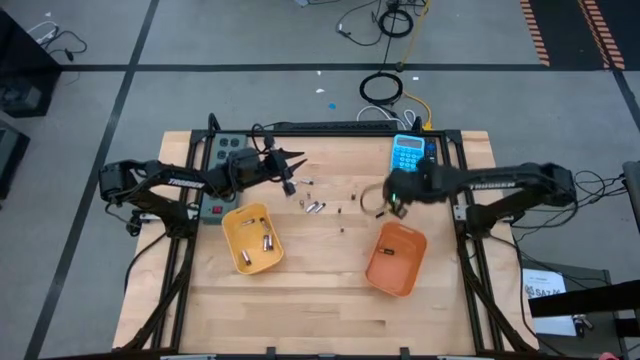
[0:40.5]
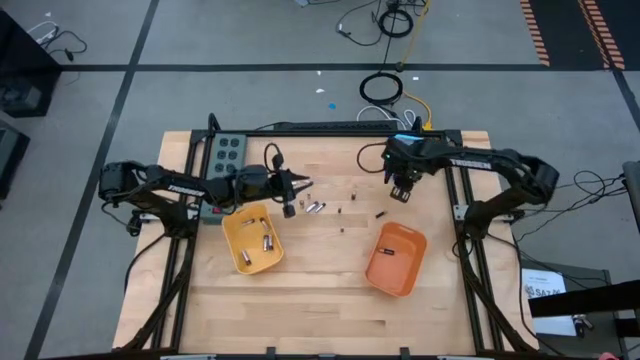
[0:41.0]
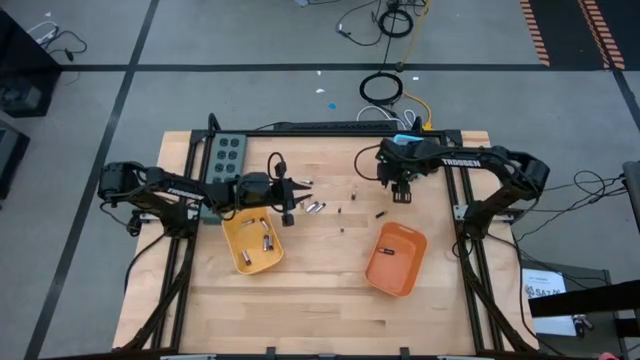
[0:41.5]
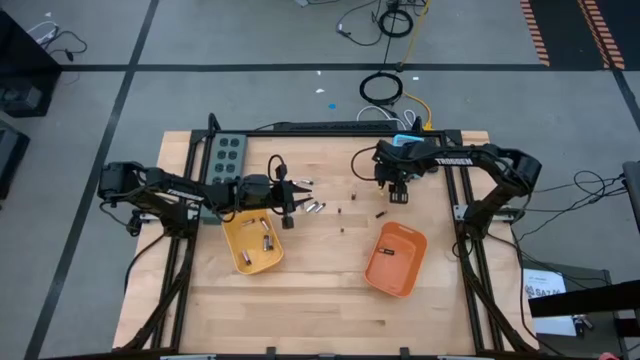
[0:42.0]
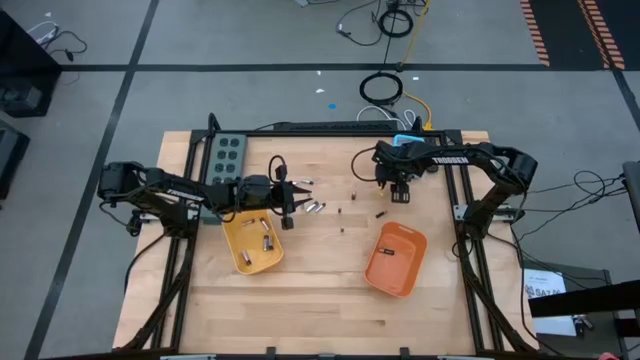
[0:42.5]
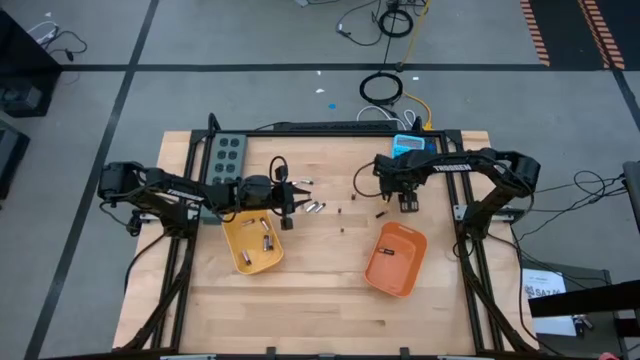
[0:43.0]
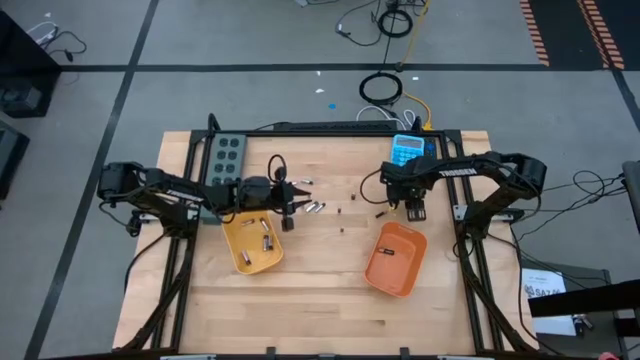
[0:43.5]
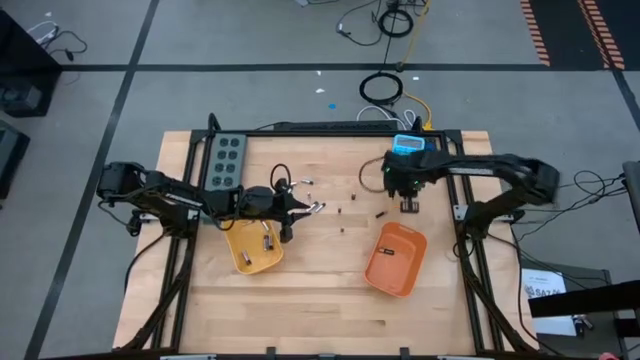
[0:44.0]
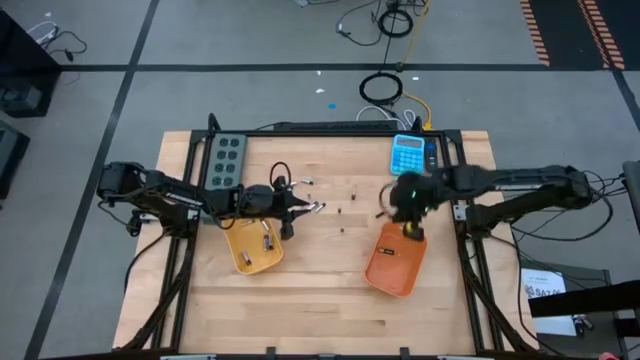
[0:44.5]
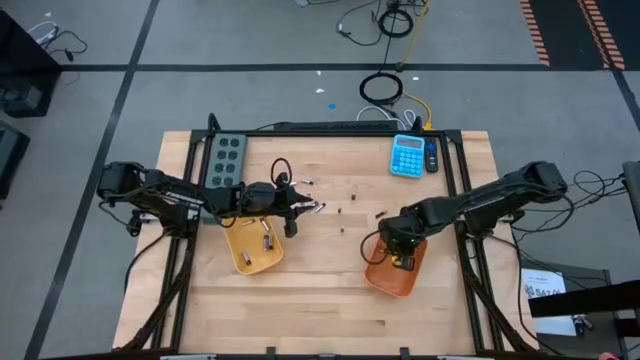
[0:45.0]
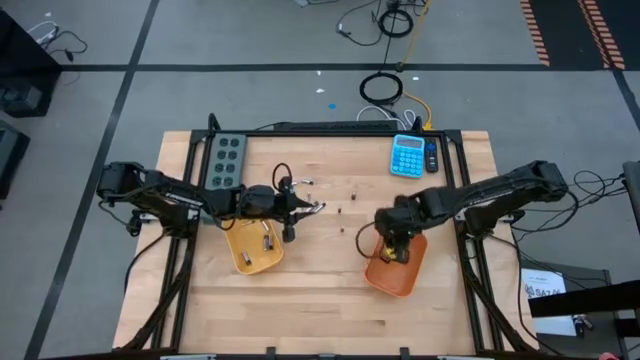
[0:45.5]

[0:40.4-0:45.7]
Task: Sort batteries
Put the black battery into the orange bin

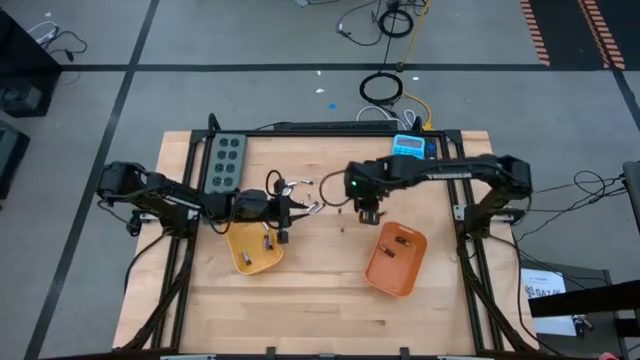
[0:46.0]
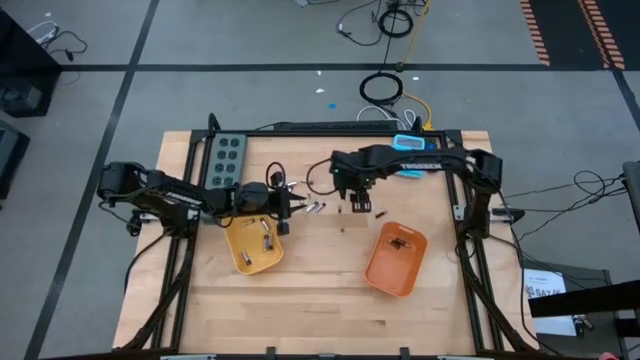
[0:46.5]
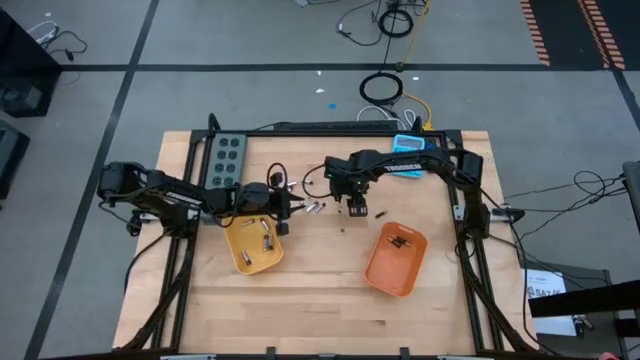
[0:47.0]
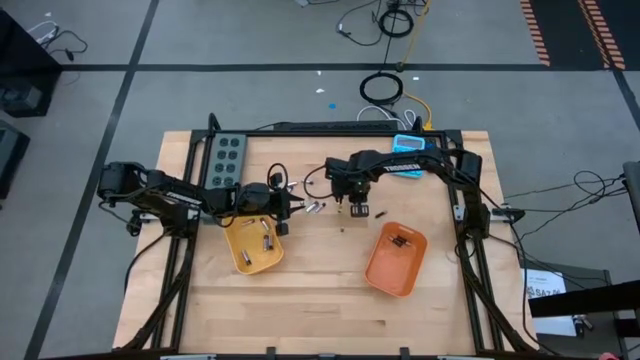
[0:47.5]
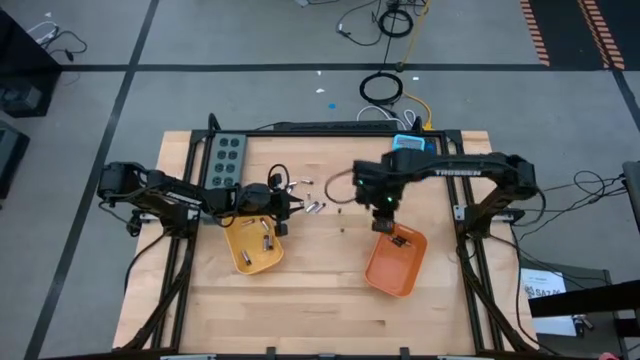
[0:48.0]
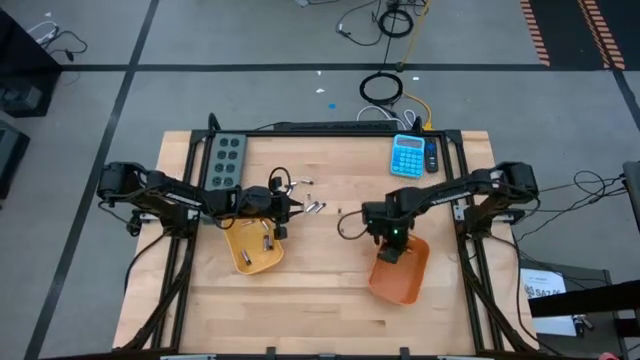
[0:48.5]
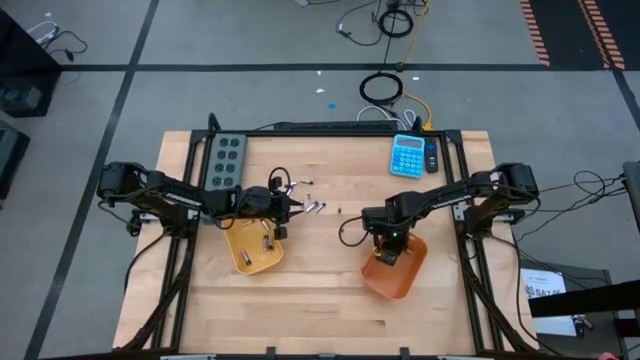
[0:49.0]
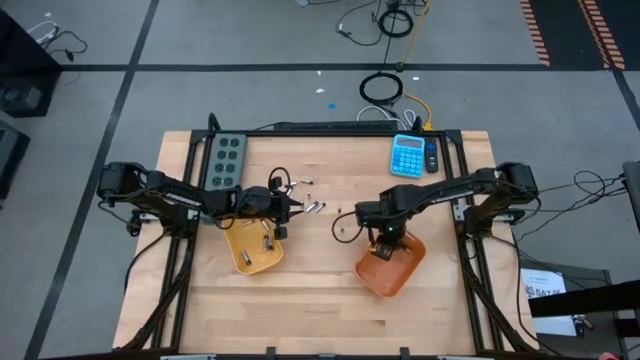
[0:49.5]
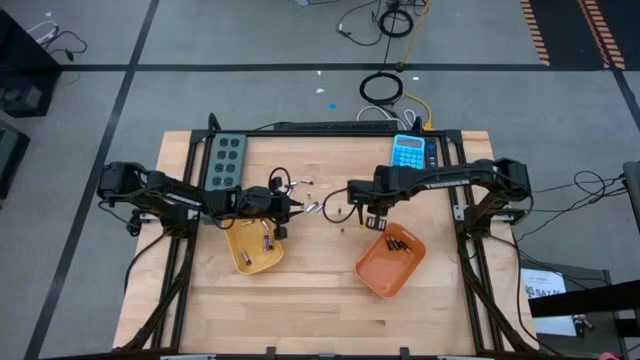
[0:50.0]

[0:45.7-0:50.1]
Put the black battery into the orange bin

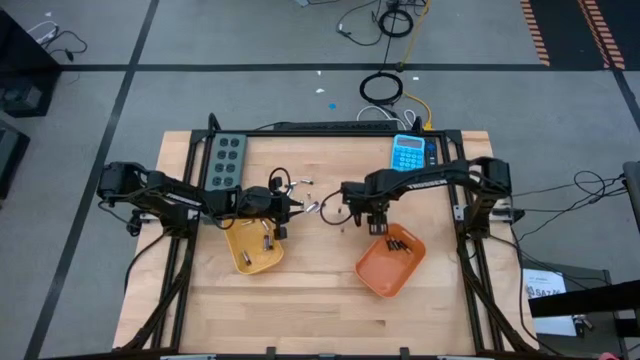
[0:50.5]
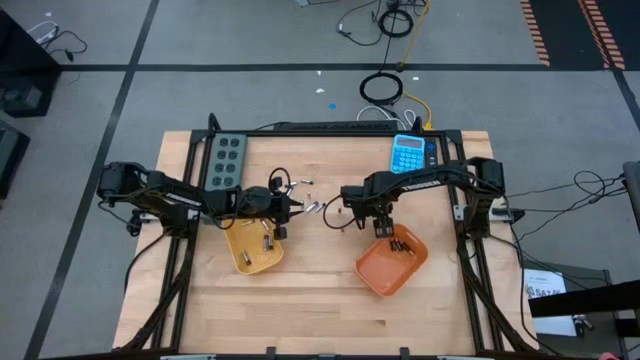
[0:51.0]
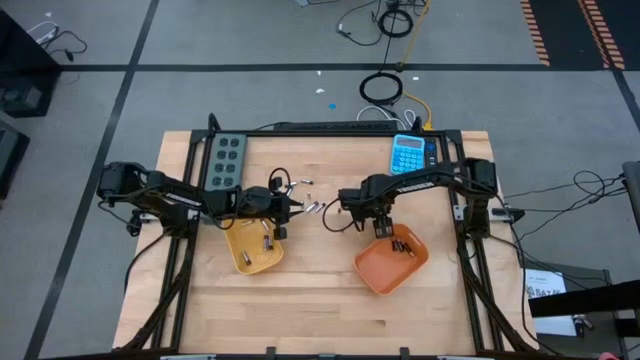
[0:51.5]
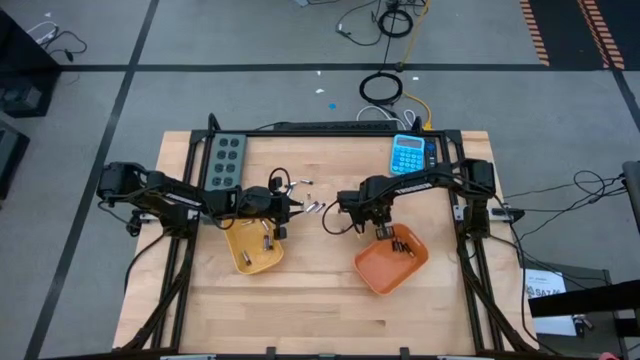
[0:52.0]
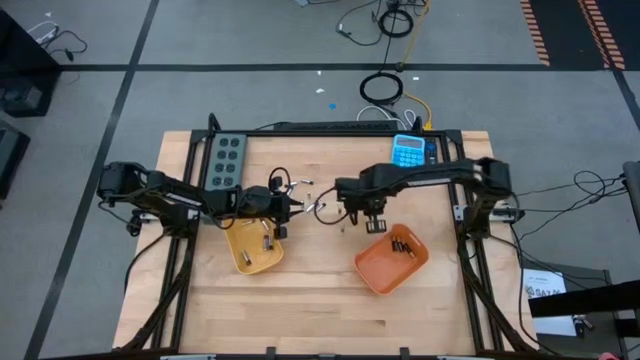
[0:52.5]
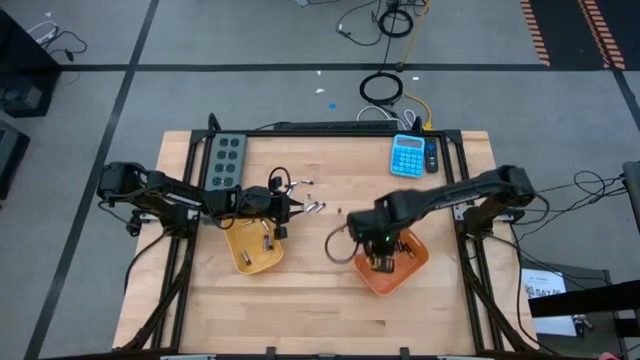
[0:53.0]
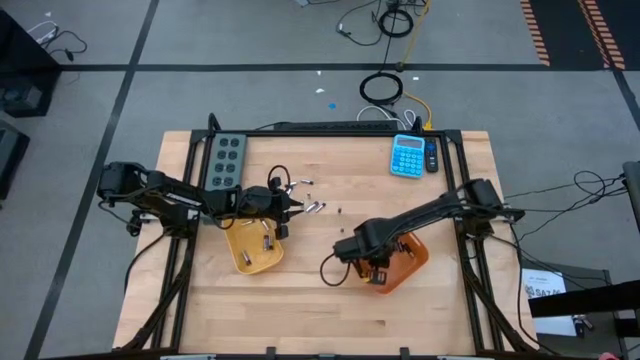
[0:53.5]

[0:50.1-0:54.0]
Put the black battery into the orange bin

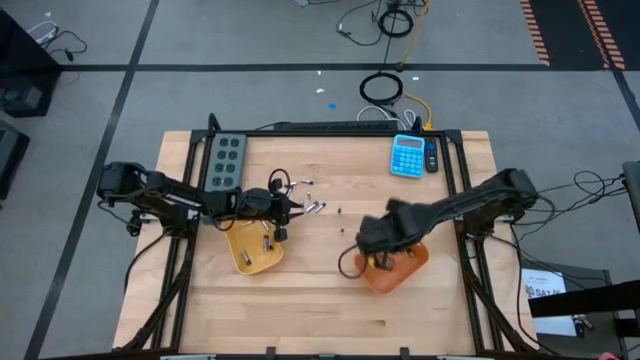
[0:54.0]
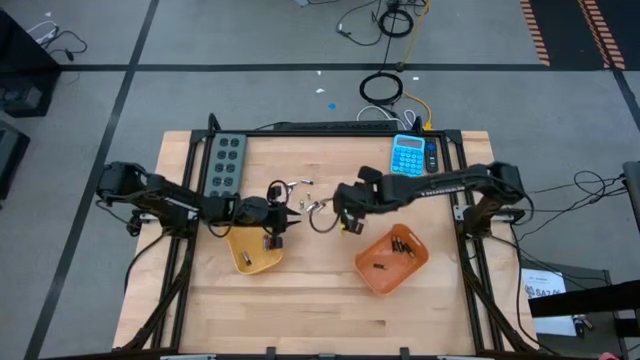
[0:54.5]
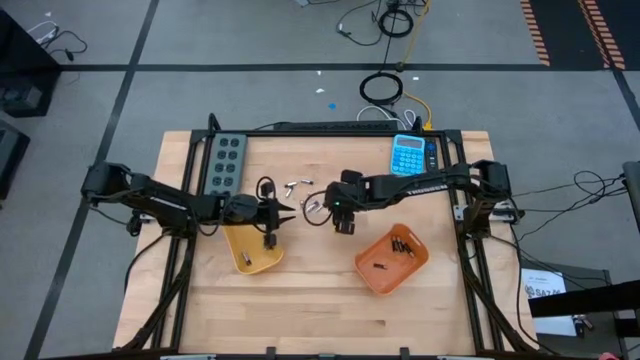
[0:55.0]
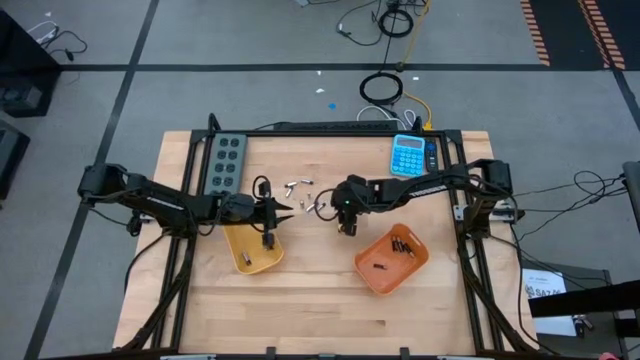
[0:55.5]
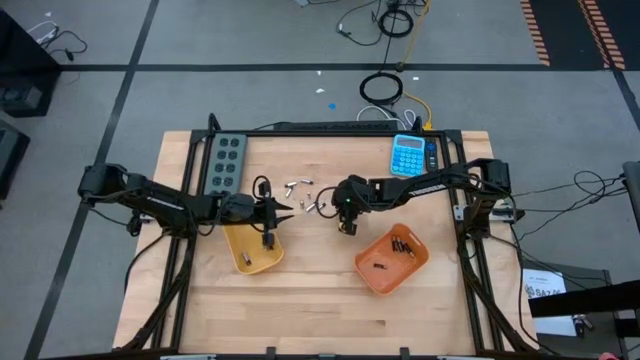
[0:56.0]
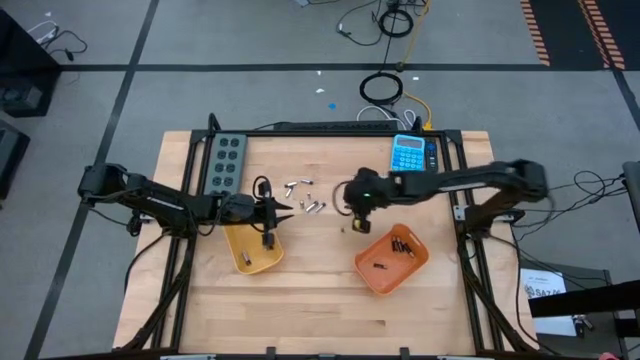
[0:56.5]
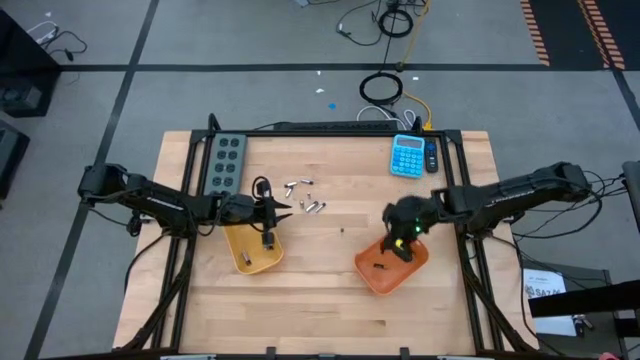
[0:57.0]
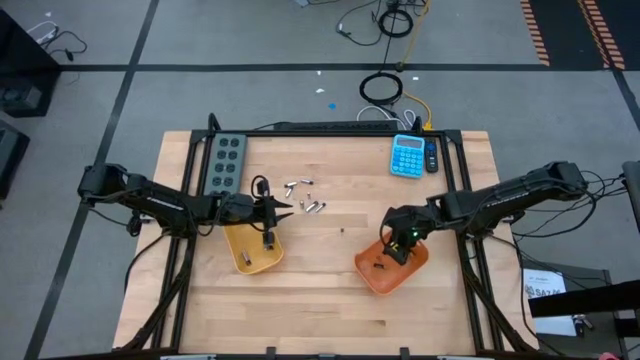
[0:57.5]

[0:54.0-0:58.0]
Put the black battery into the orange bin

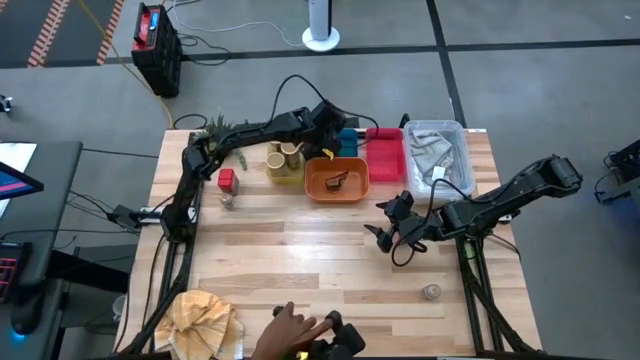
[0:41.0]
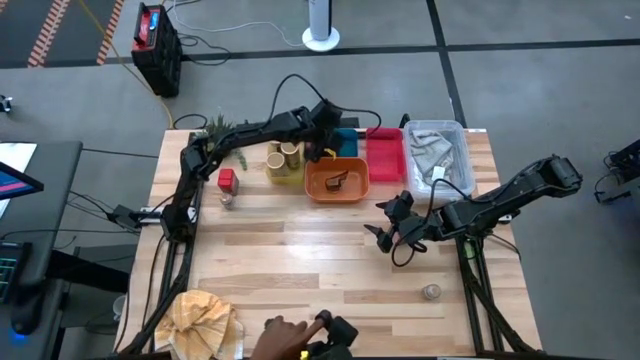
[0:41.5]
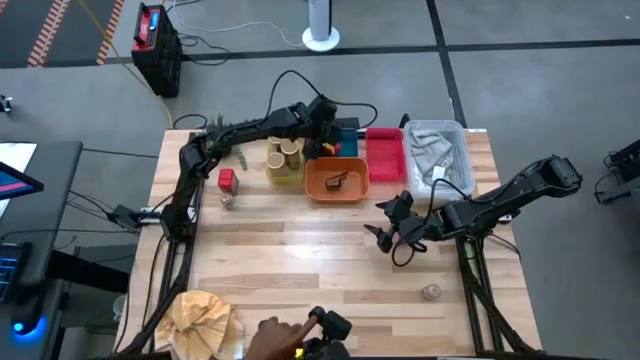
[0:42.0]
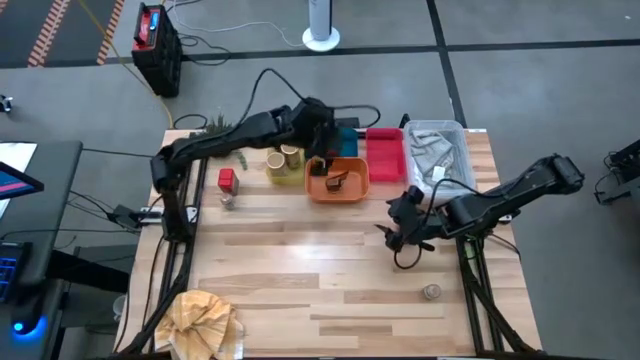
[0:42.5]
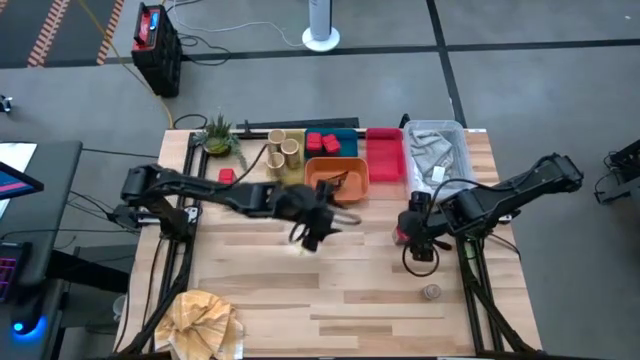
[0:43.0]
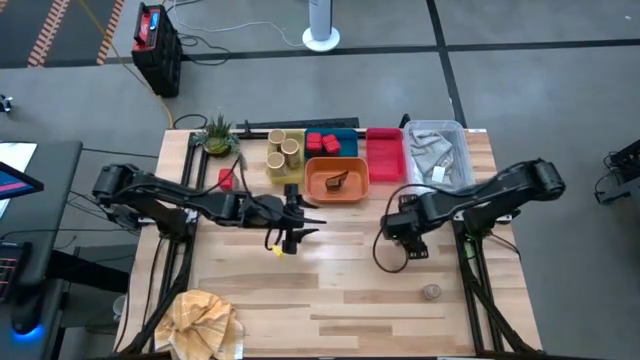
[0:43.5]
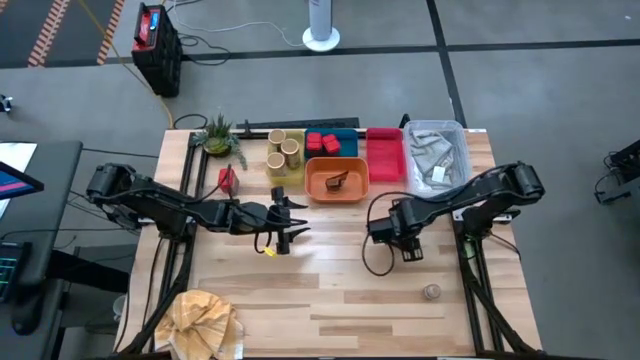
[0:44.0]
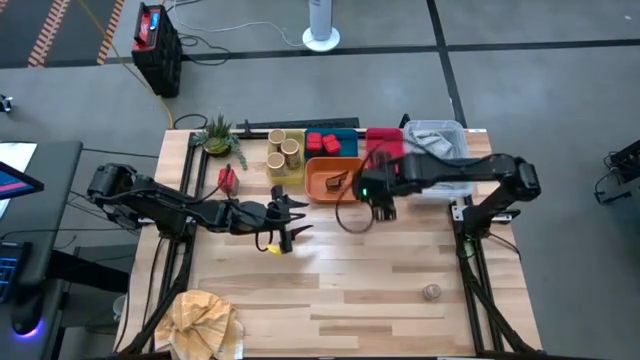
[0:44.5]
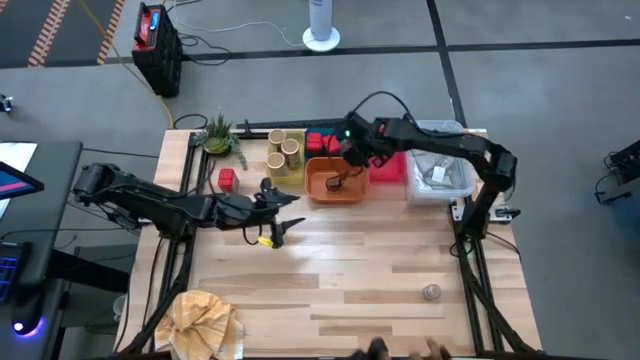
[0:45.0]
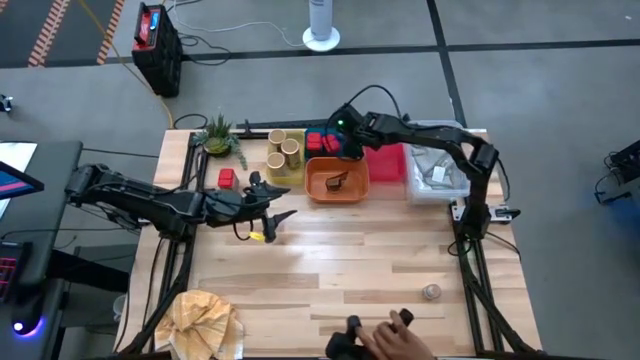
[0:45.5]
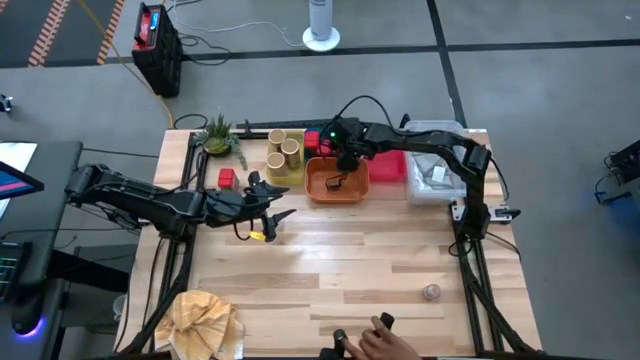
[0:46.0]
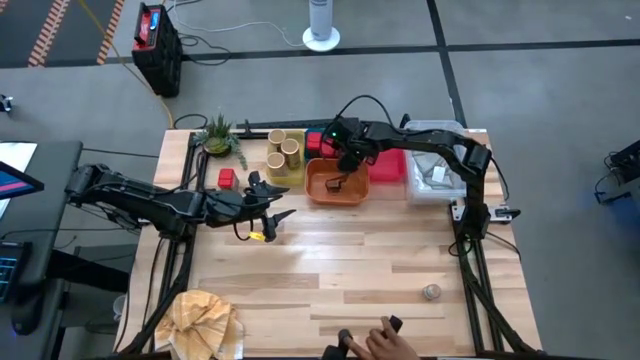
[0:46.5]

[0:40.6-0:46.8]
Task: Sort spices by type
Put the middle right red seasoning can into the blue bin
